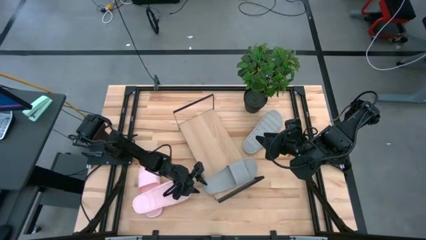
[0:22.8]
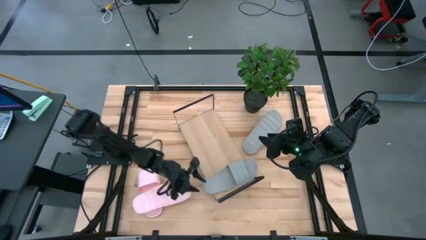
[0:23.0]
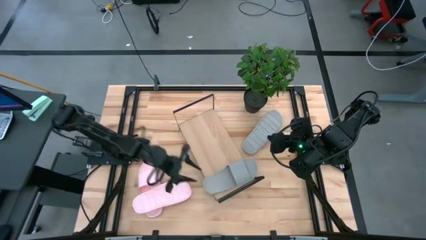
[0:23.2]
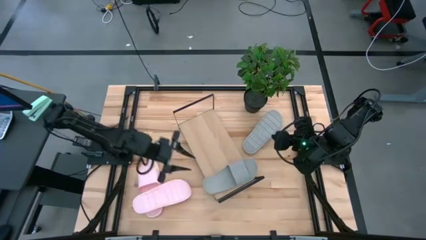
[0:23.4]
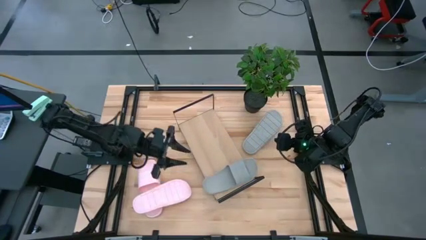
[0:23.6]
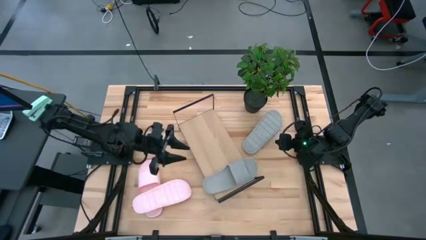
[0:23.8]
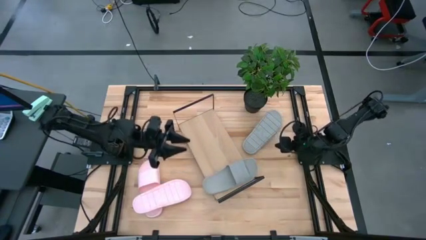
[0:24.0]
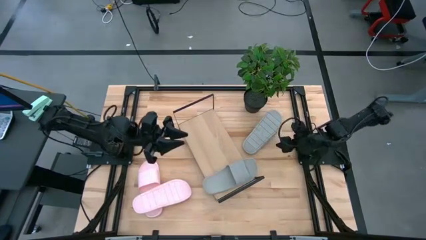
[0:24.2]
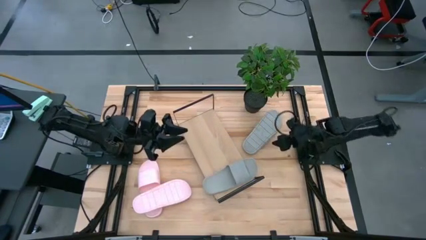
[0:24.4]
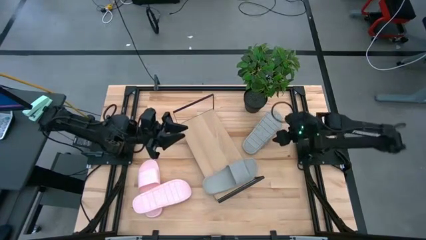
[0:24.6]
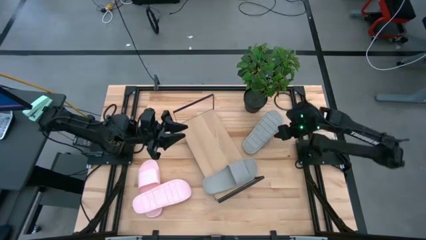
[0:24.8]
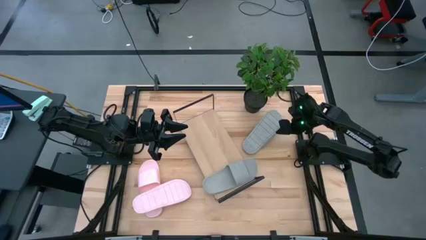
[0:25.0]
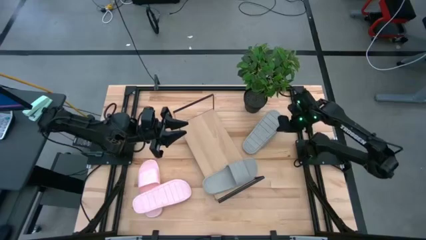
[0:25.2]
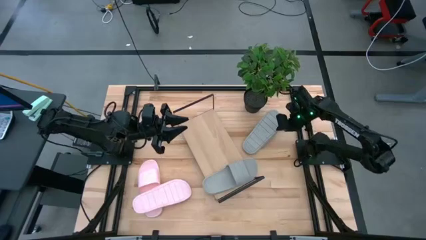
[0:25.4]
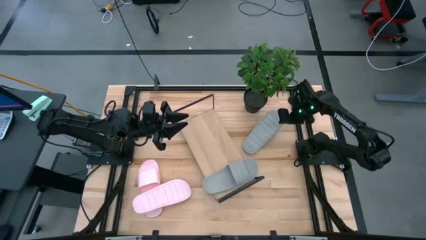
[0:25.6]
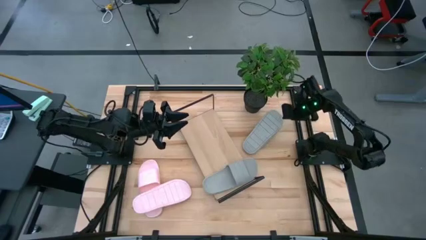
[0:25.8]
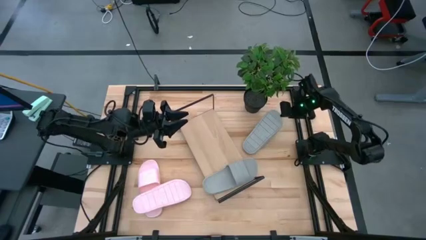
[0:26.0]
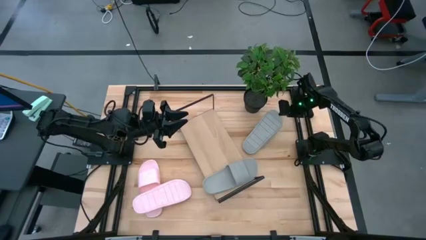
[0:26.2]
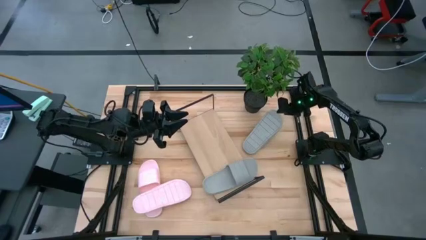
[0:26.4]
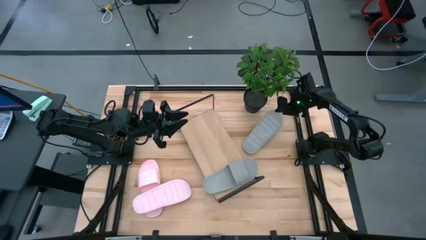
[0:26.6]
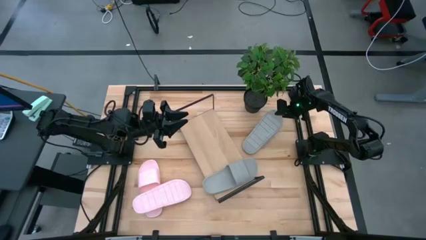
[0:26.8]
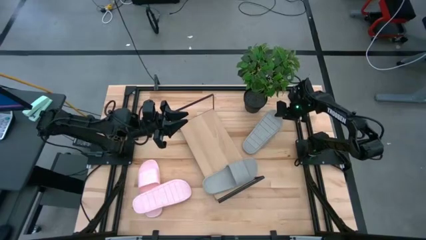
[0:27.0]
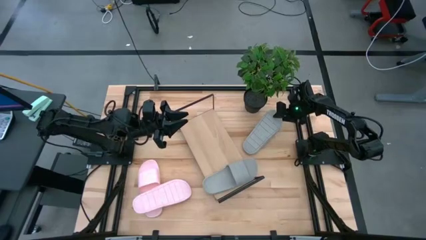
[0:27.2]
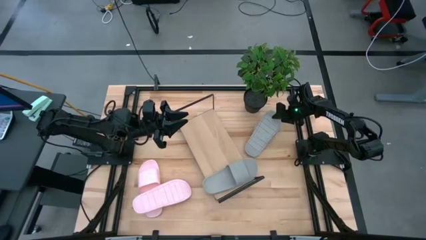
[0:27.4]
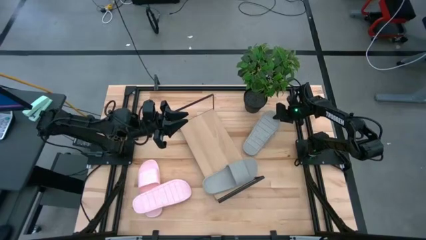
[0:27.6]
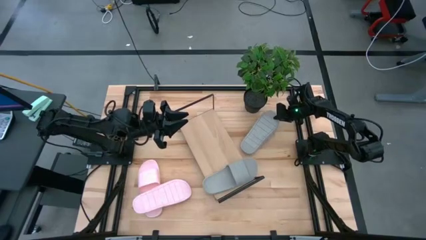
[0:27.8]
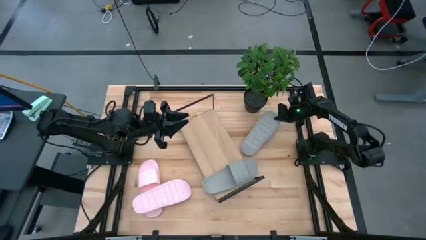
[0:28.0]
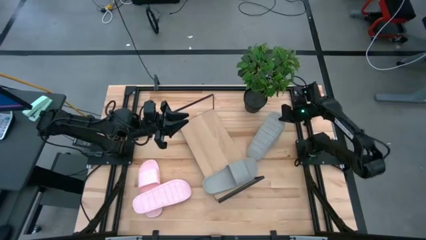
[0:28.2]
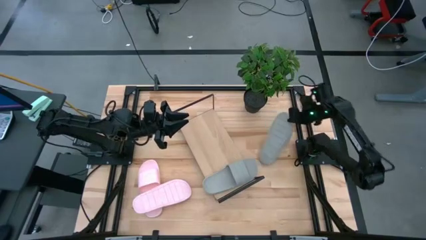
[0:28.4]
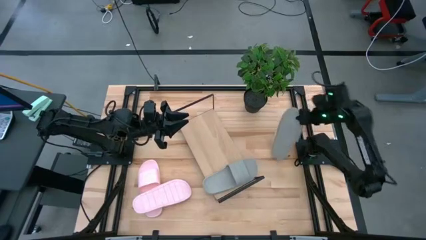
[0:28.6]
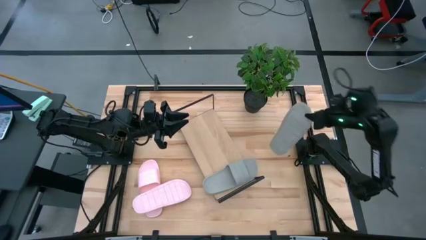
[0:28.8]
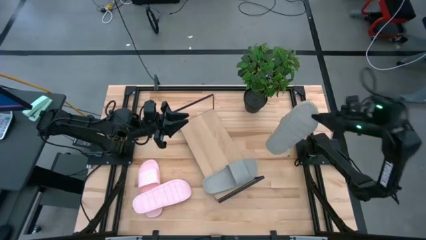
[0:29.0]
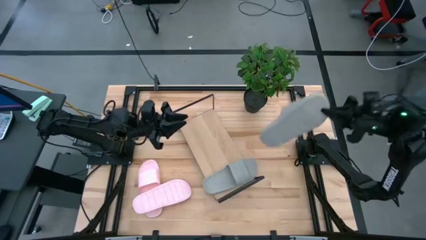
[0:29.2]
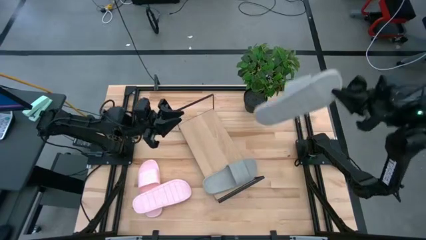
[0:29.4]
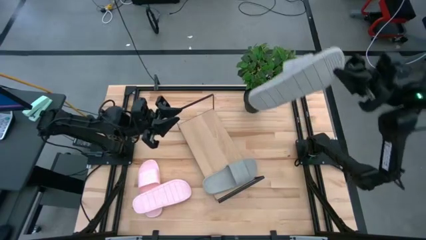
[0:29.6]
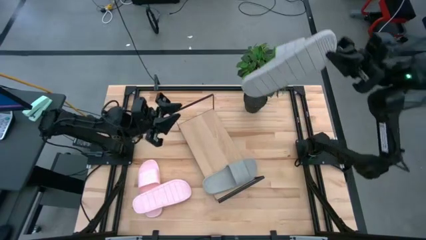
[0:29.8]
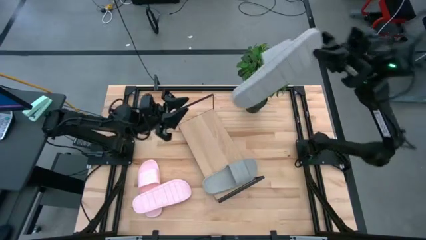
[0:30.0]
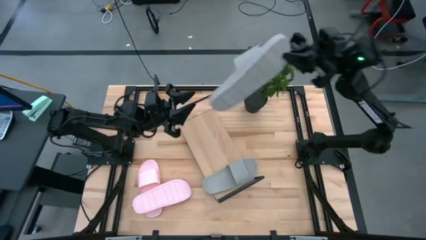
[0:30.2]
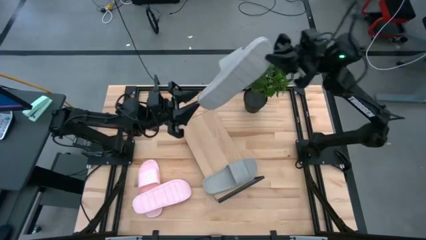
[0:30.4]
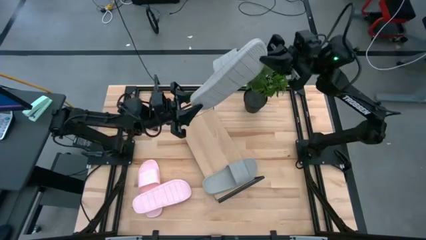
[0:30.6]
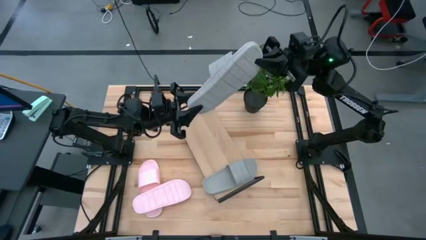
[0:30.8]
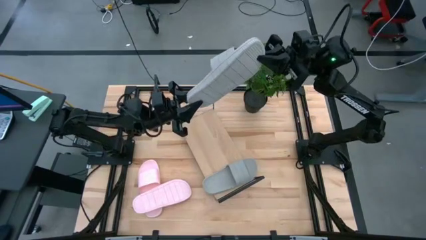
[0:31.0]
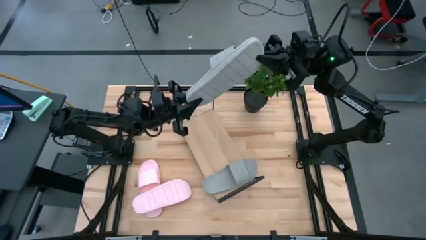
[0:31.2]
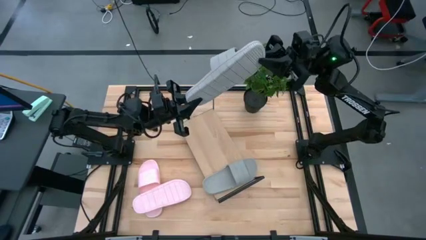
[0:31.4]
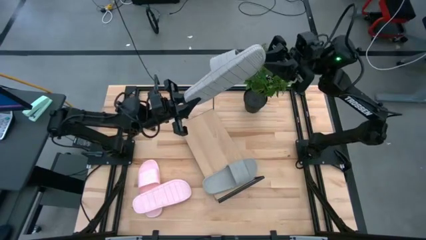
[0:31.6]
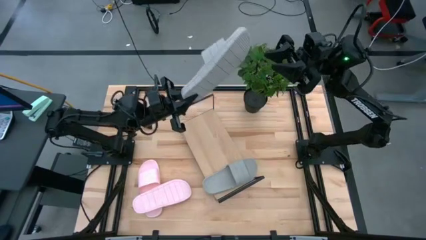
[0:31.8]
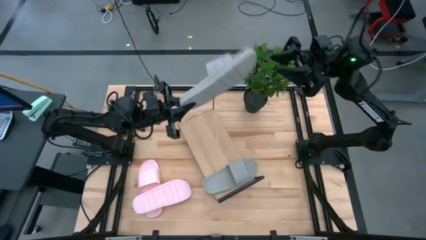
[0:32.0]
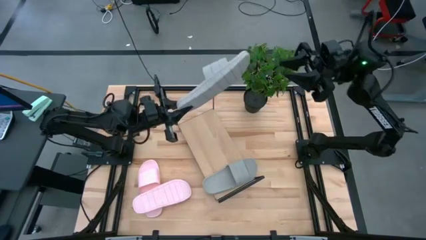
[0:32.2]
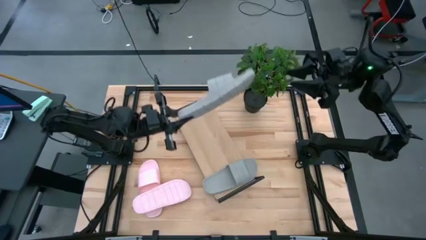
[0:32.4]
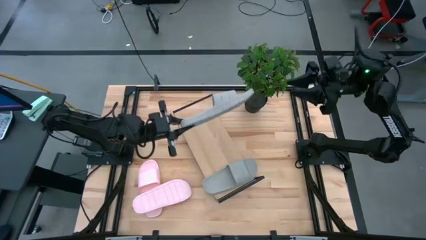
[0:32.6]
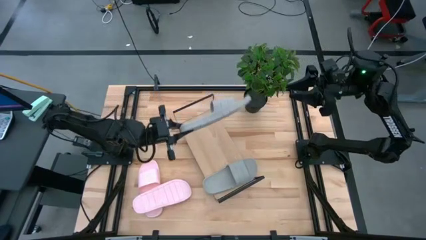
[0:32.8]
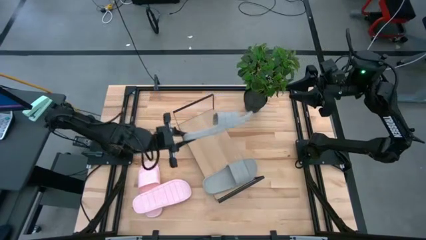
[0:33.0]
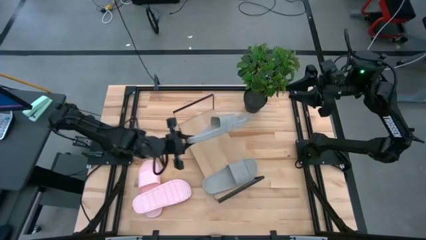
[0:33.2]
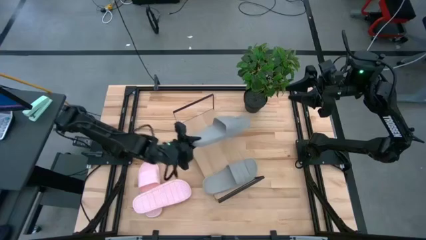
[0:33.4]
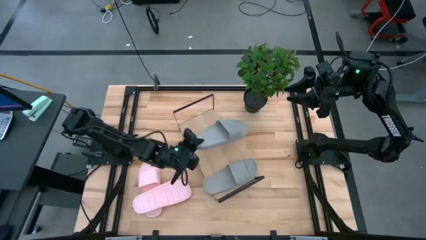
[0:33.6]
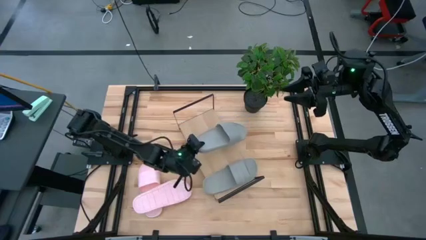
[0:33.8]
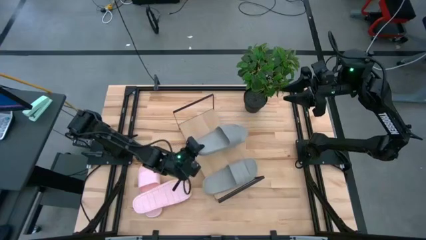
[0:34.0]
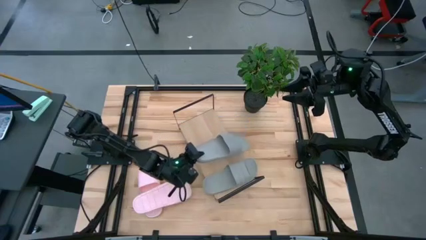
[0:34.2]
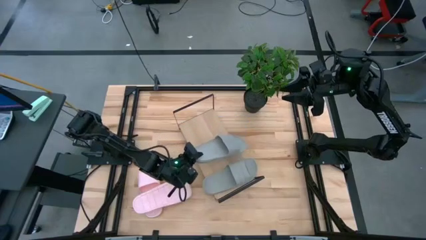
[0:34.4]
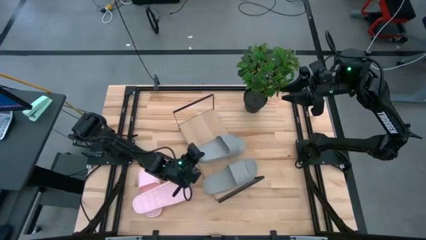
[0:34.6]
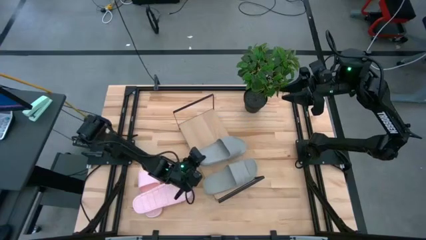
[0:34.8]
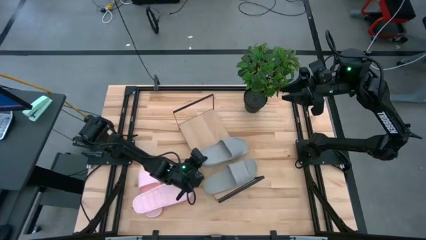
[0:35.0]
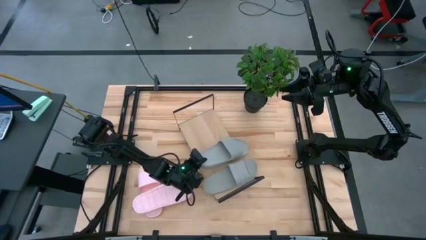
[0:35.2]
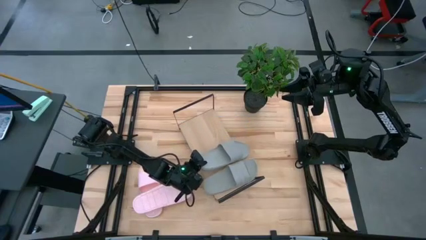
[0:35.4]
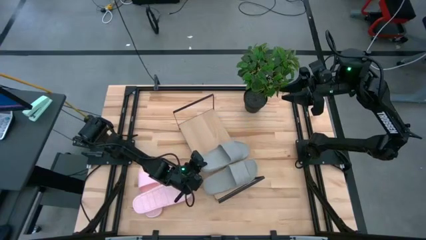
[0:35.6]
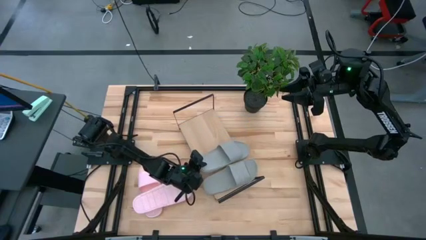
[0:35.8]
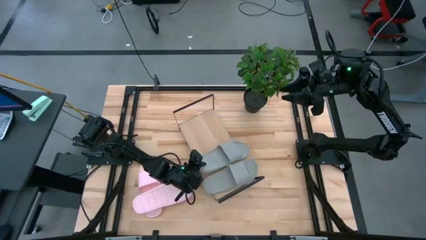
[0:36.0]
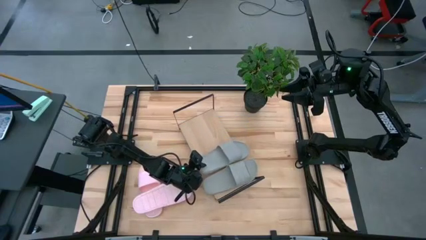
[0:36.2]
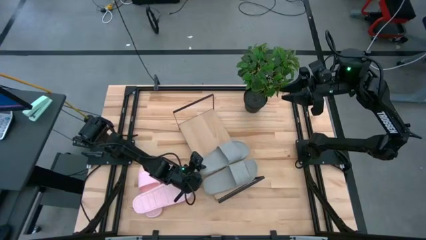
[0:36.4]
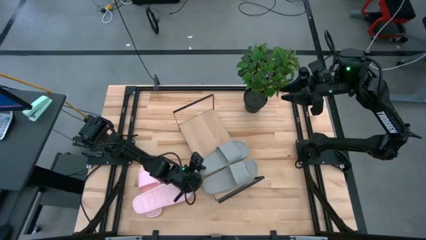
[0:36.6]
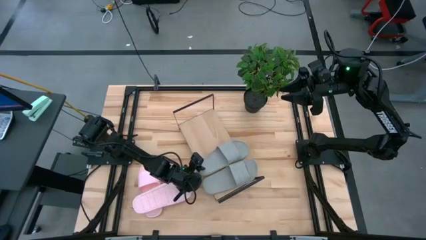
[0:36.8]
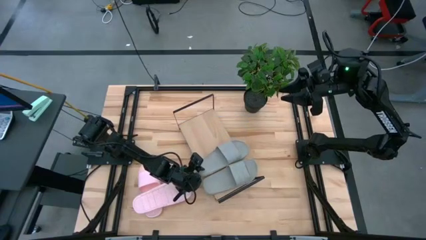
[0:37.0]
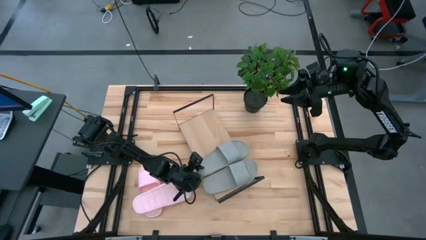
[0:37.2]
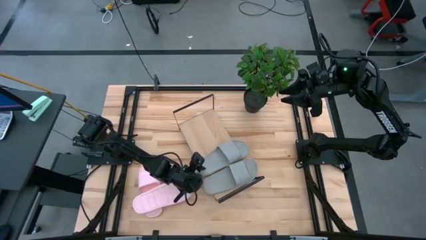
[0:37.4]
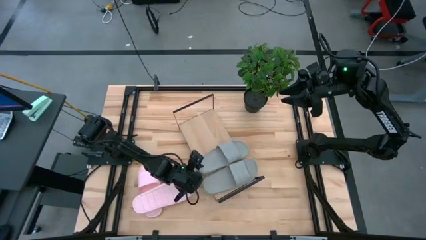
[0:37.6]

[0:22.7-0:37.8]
Task: Pick and place slides into the shelf
Put the gray slide on the shelf
